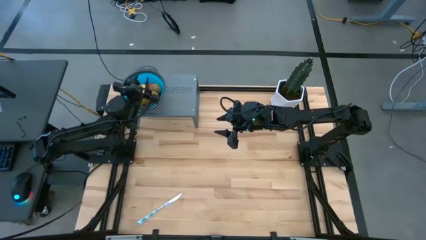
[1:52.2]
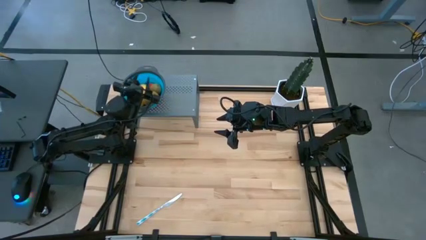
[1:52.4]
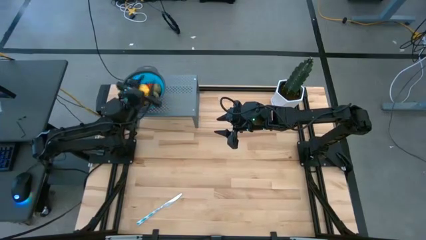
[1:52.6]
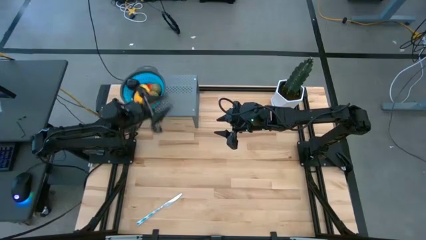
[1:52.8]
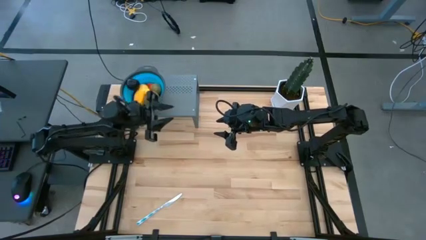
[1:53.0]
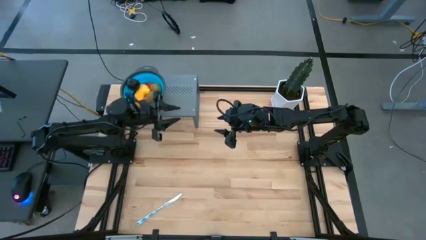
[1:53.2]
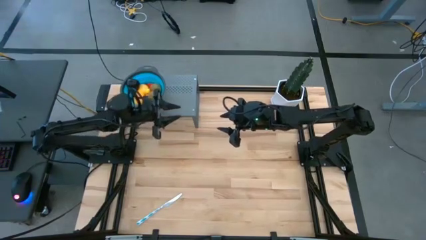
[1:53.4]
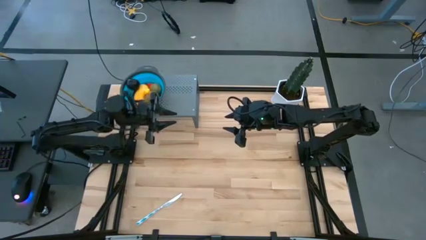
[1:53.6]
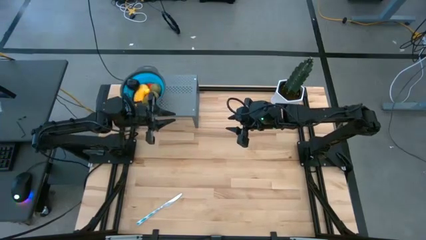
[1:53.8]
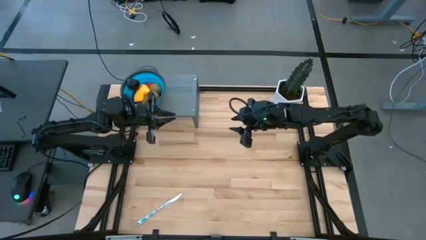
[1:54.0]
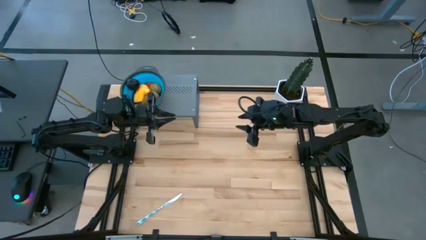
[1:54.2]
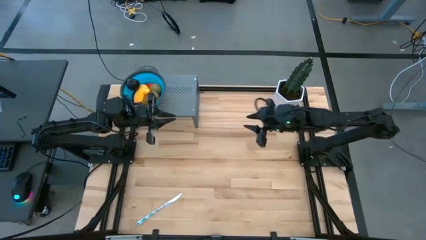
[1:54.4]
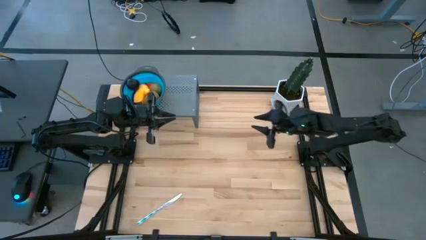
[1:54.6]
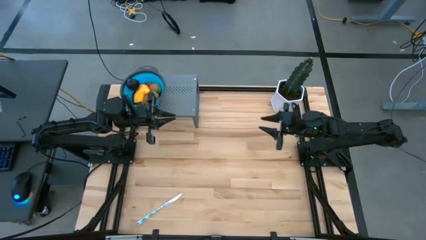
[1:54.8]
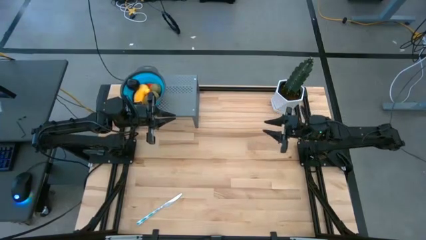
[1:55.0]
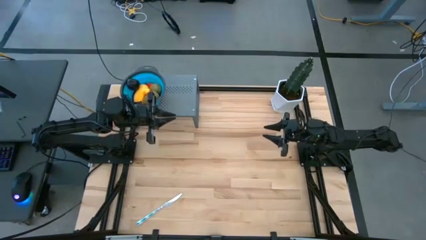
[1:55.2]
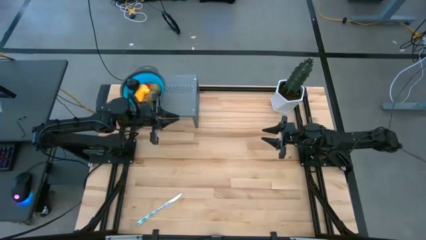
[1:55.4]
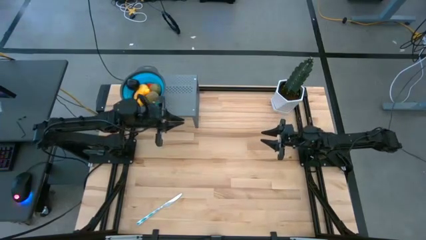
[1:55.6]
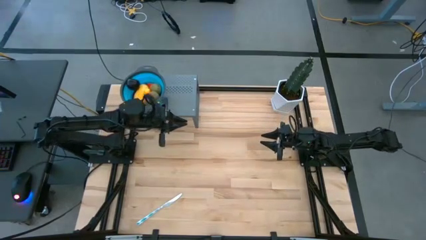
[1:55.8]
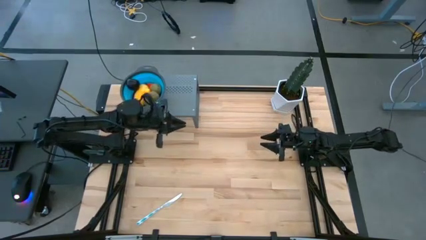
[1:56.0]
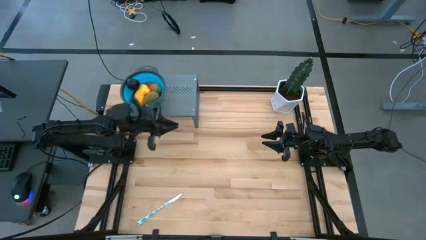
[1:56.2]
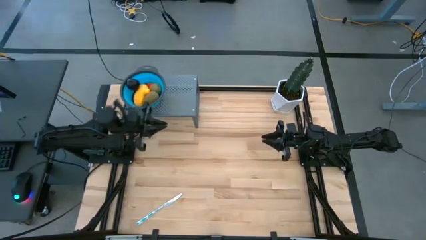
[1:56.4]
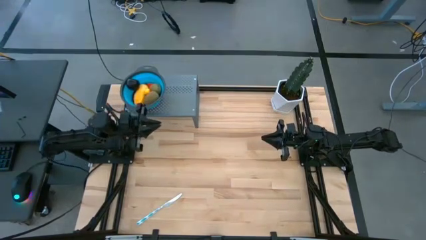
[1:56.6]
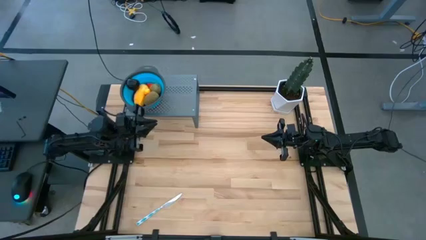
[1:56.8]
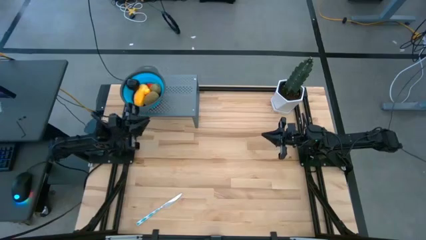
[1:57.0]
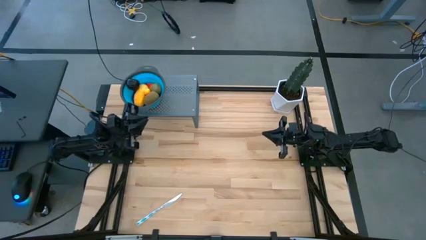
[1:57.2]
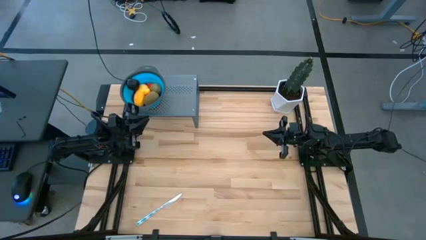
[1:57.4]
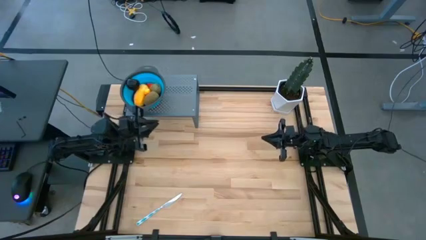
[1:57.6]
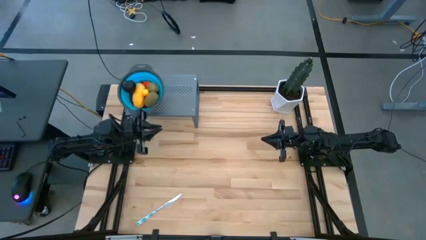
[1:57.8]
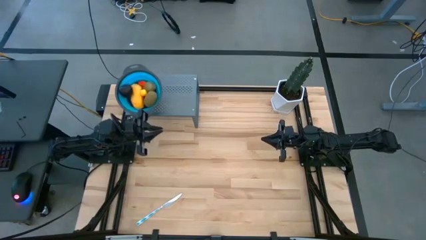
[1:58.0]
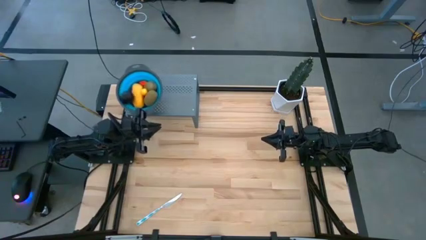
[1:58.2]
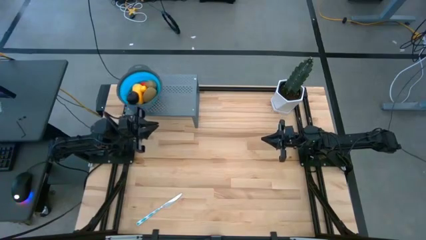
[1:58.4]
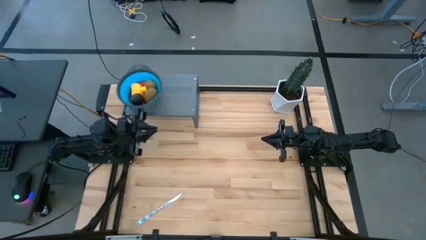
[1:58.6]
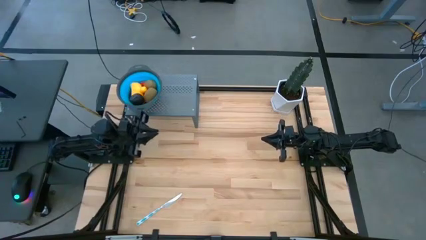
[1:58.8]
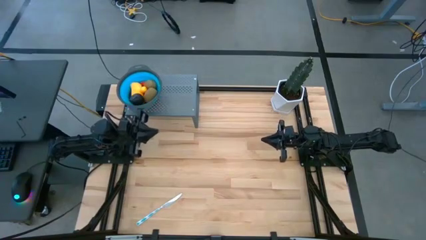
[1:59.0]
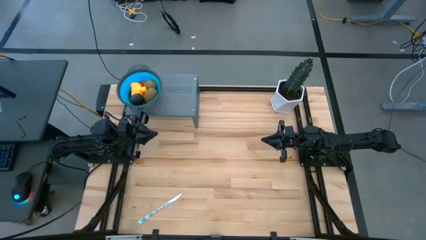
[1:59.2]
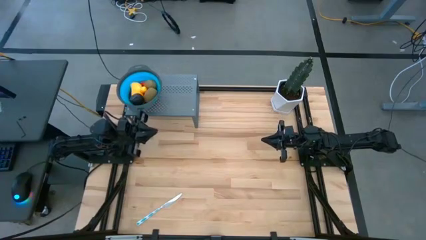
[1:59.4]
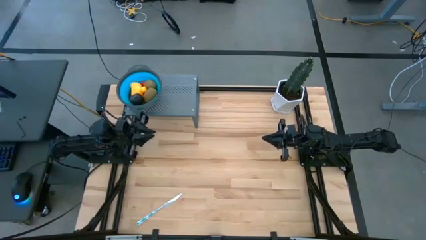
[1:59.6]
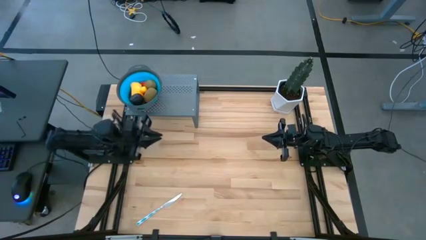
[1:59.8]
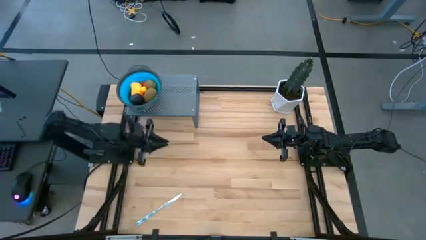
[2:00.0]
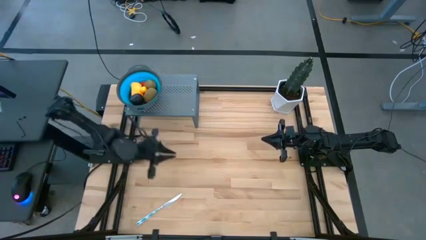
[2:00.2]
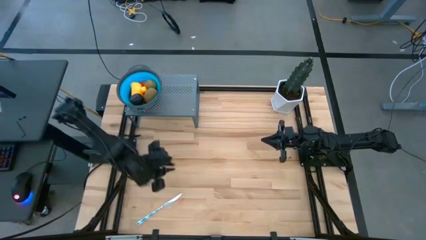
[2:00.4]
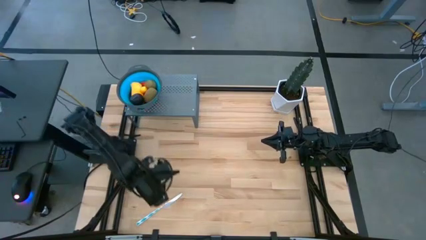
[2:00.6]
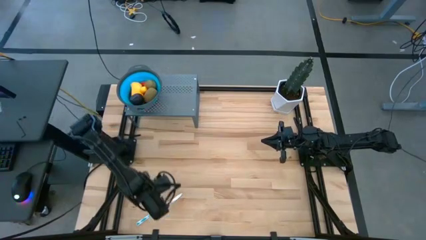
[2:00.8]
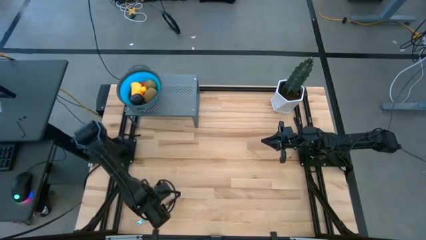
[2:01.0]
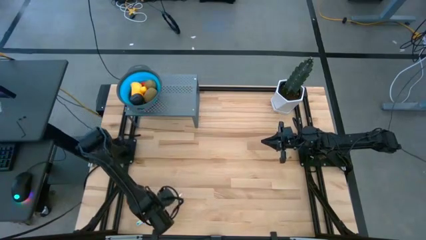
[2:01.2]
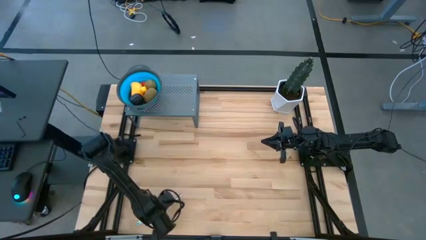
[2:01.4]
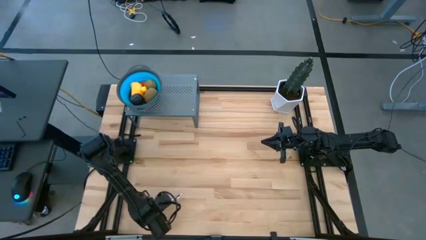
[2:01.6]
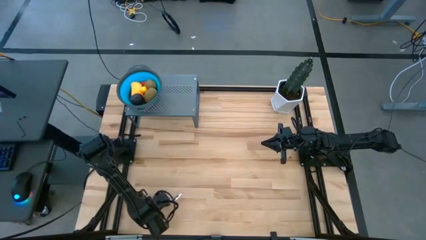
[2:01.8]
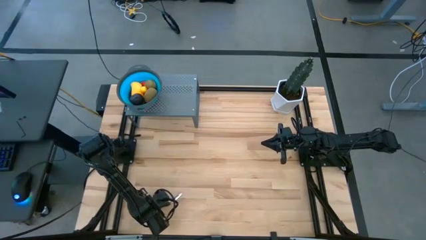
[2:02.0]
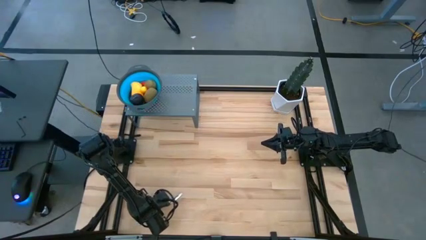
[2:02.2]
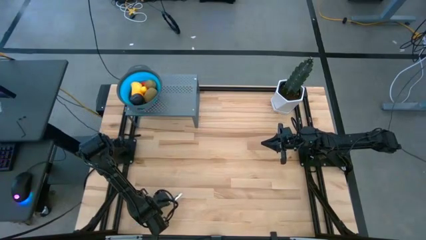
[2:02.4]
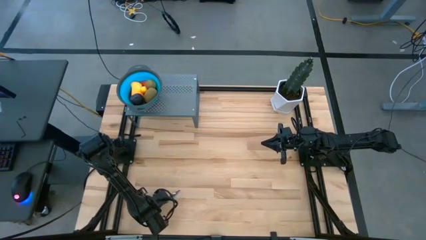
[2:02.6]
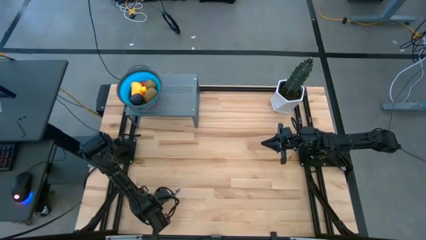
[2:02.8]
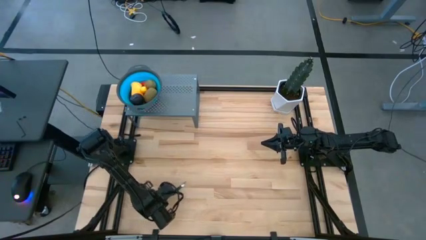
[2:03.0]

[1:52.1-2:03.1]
Task: Pick & Place Fruit
Put the blue knife on the shelf
